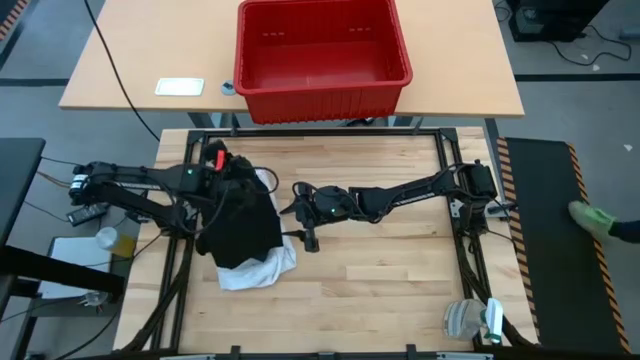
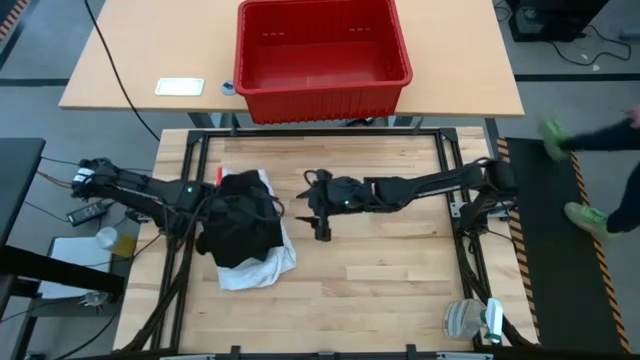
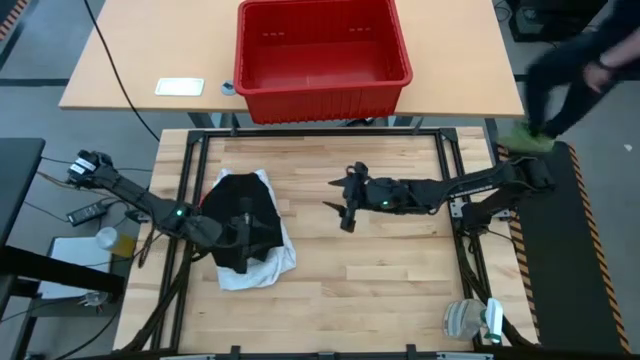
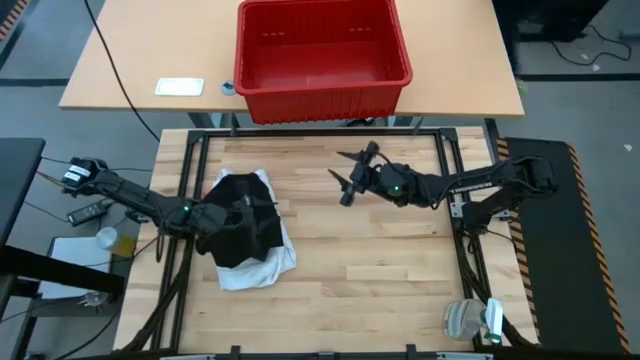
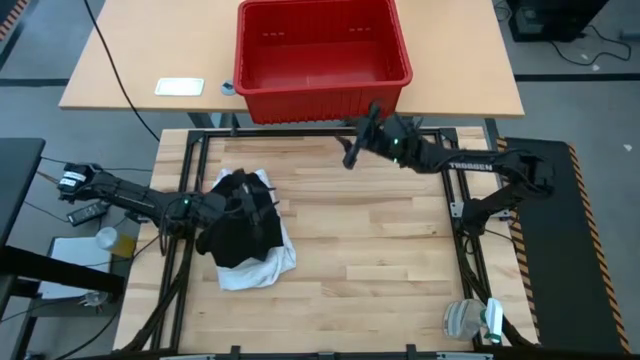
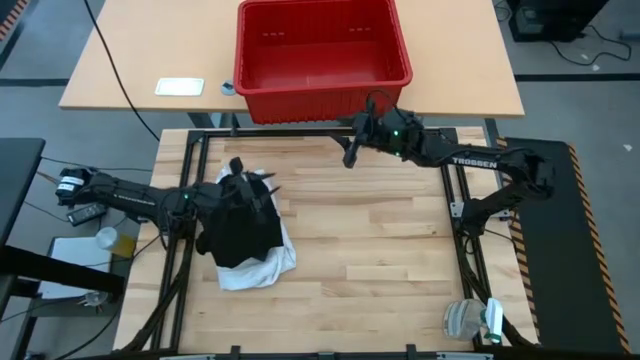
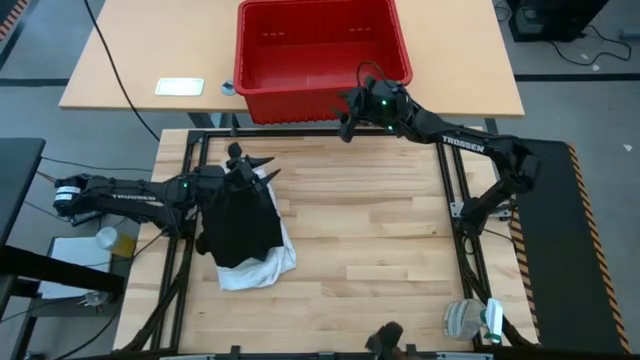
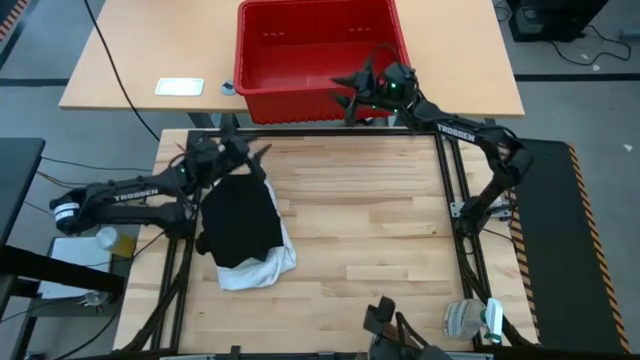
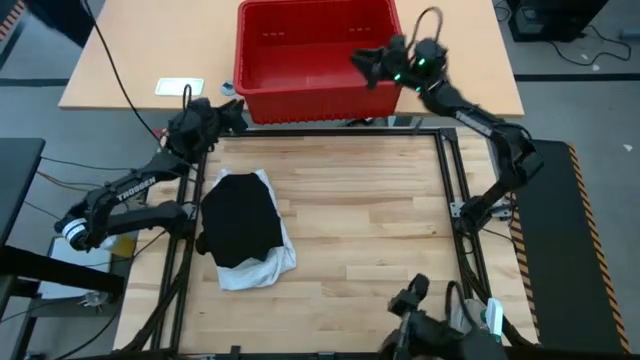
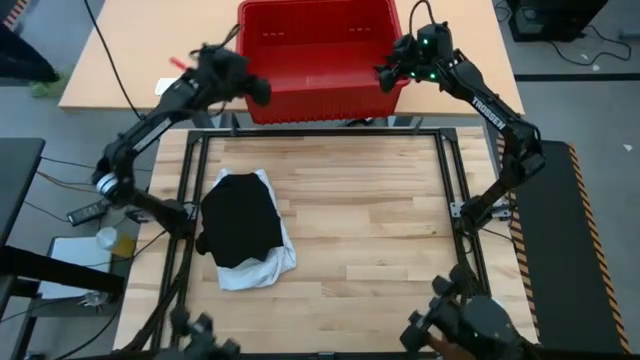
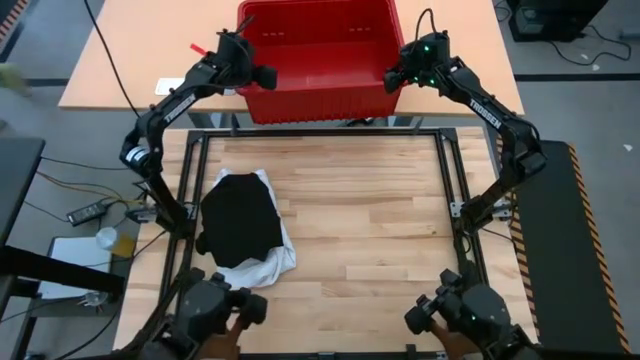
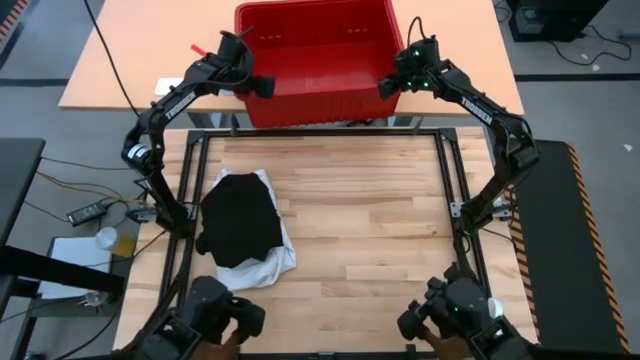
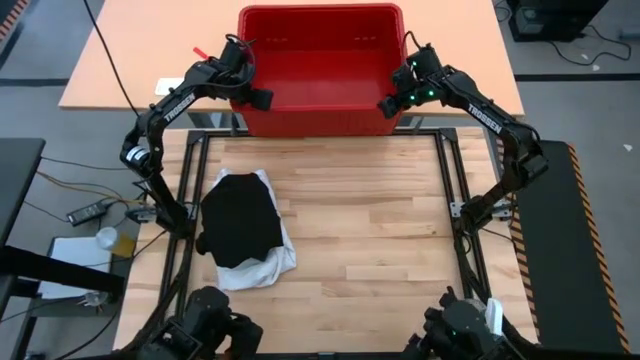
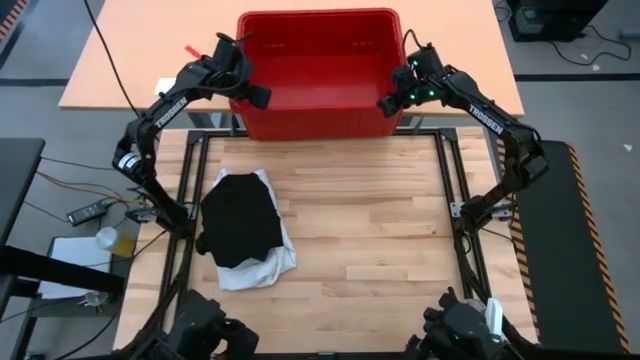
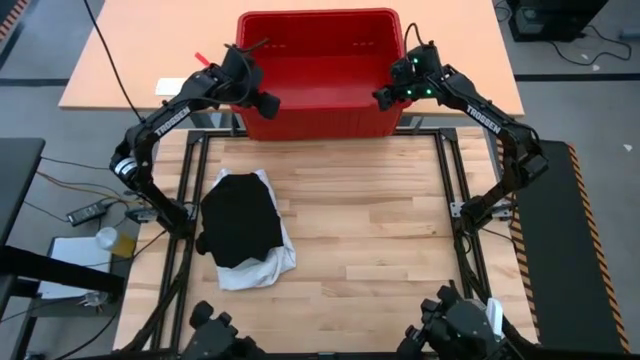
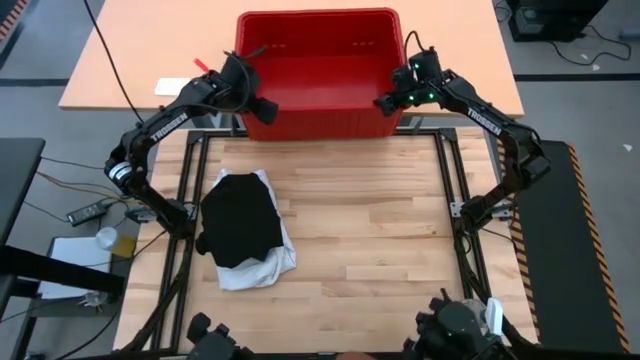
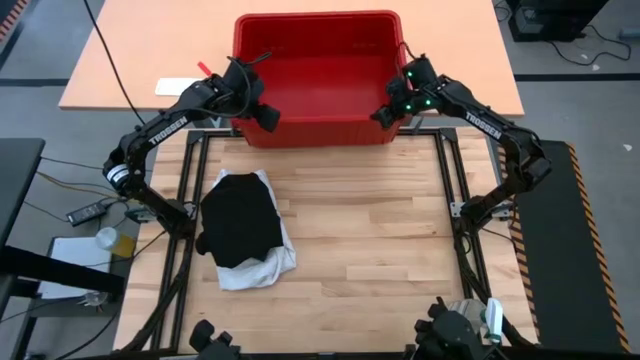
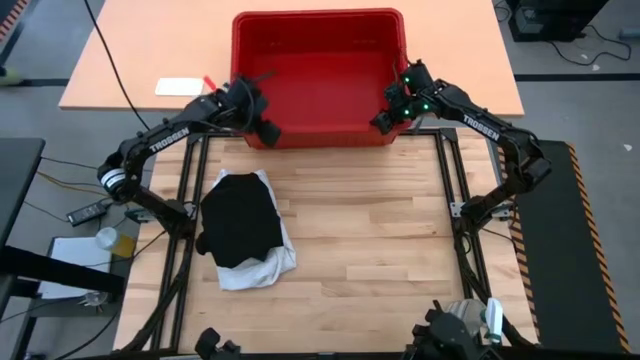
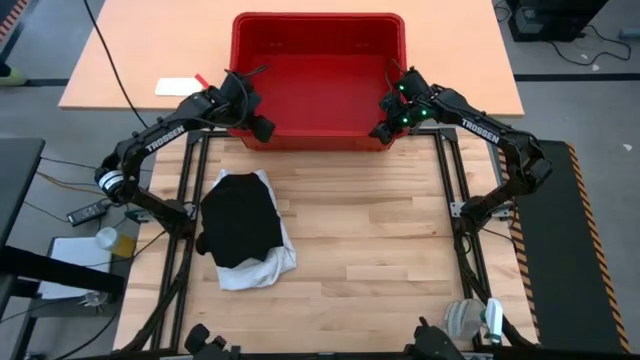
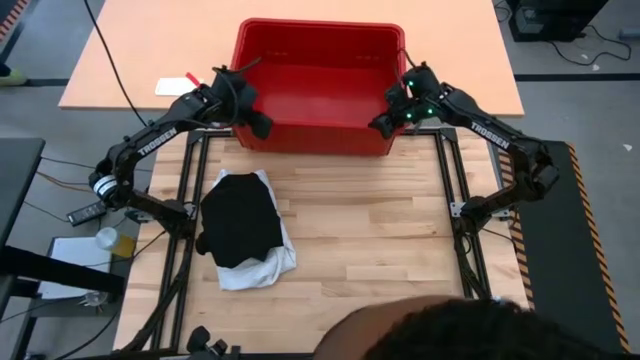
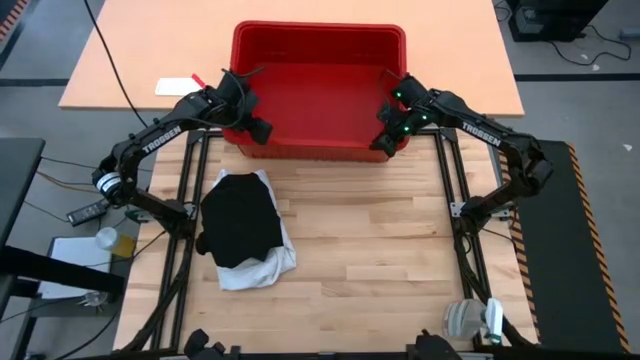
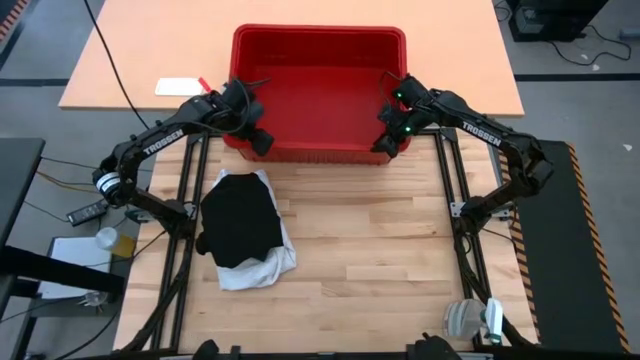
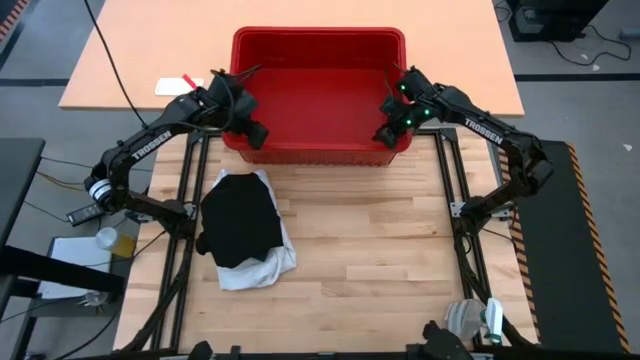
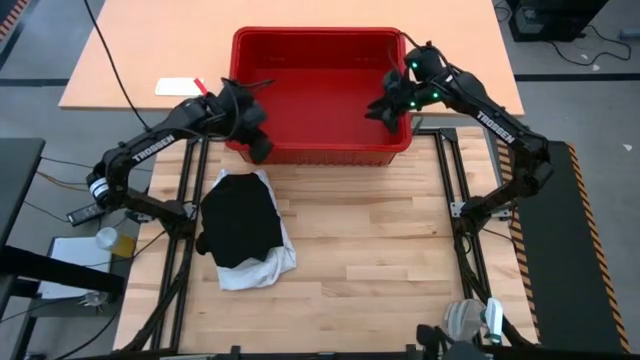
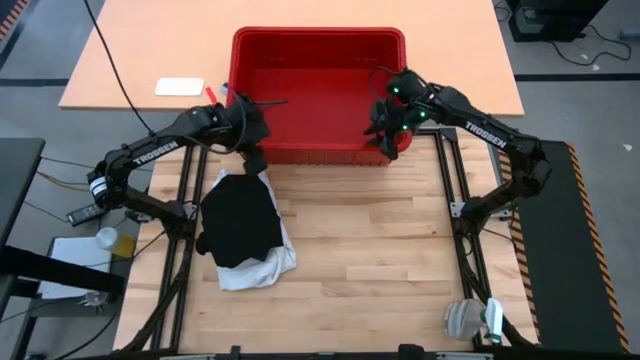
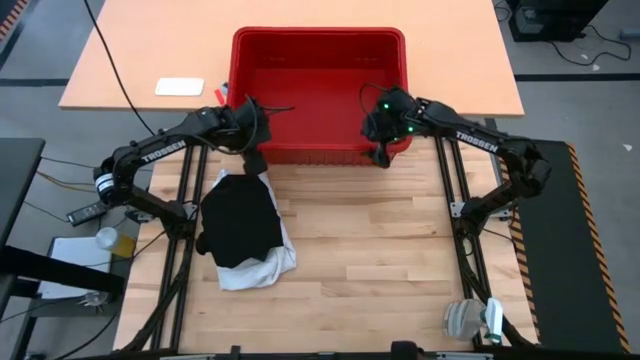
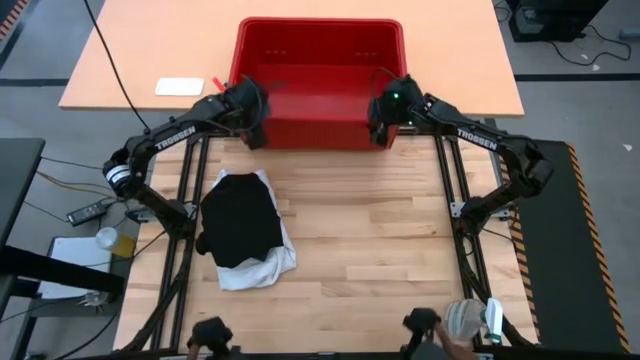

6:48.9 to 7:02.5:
Task: Fold laundry
Adjust the red bin

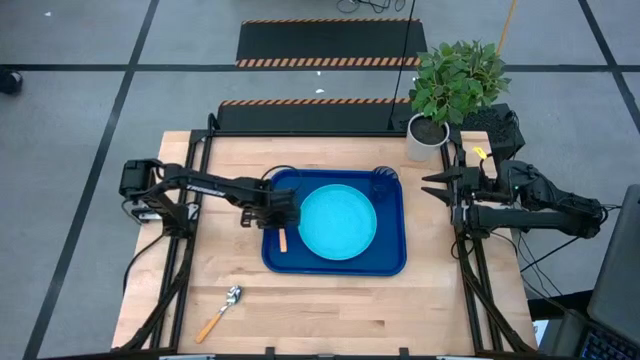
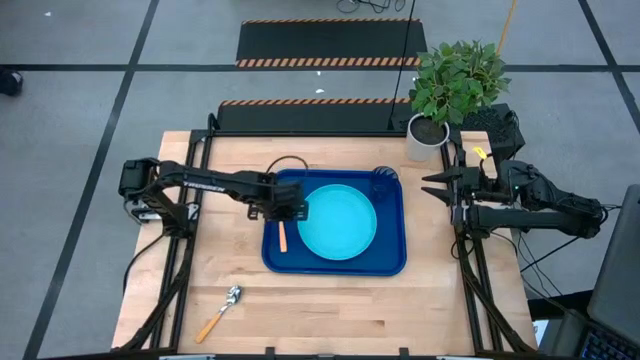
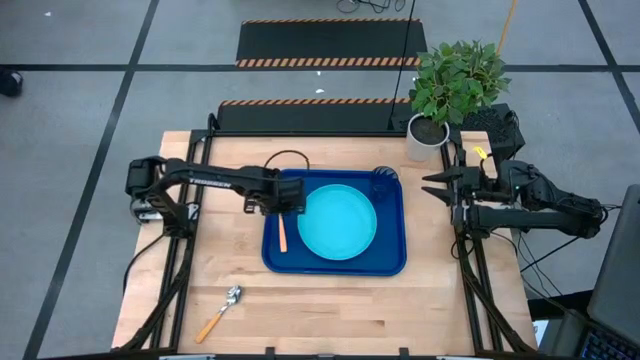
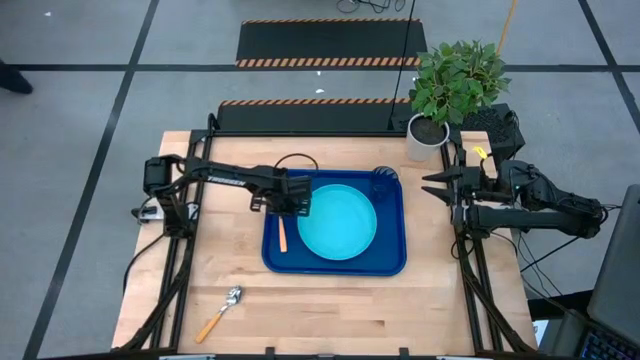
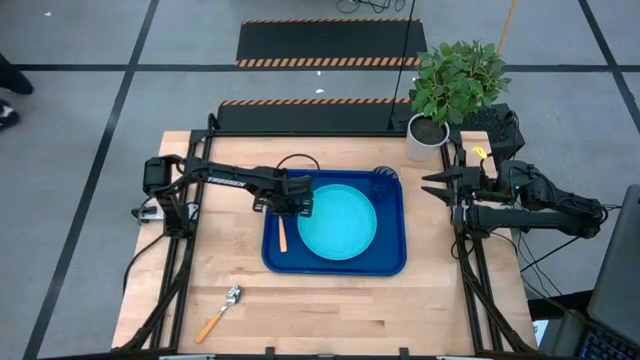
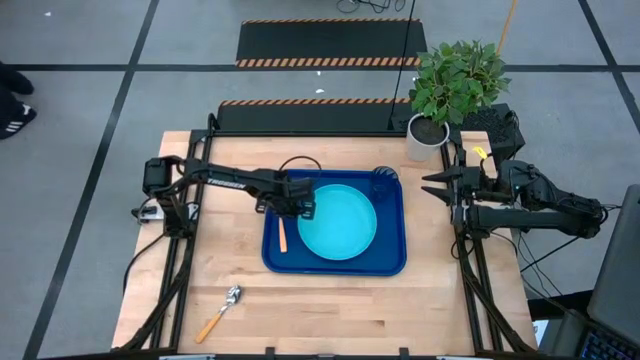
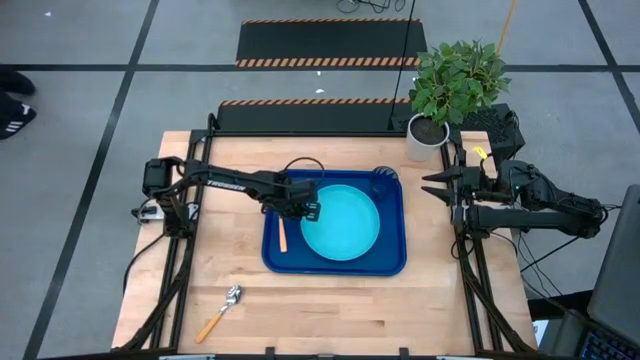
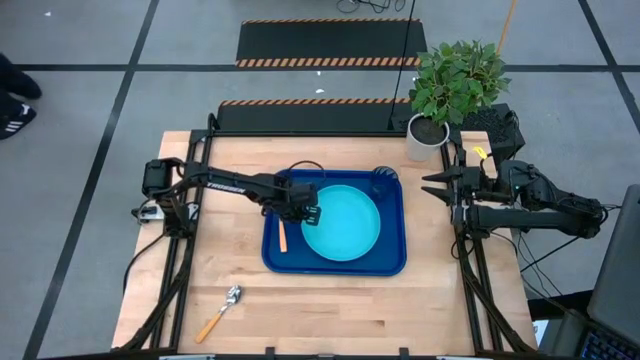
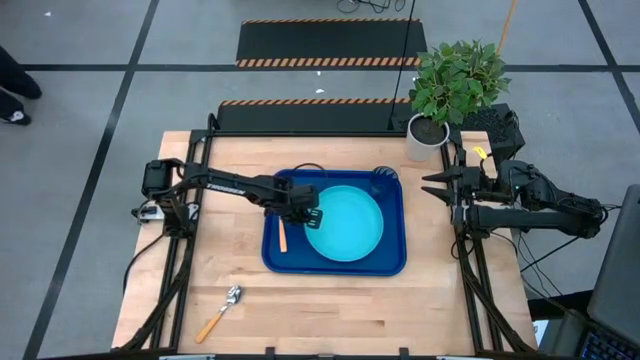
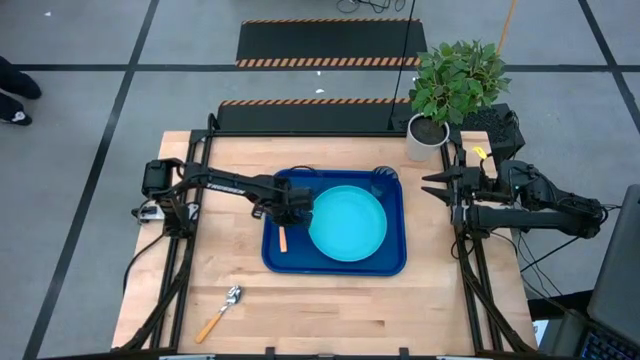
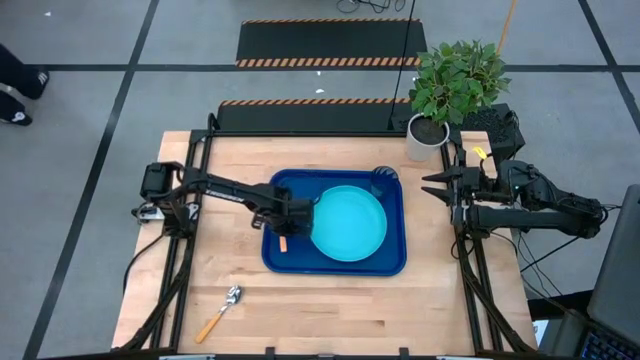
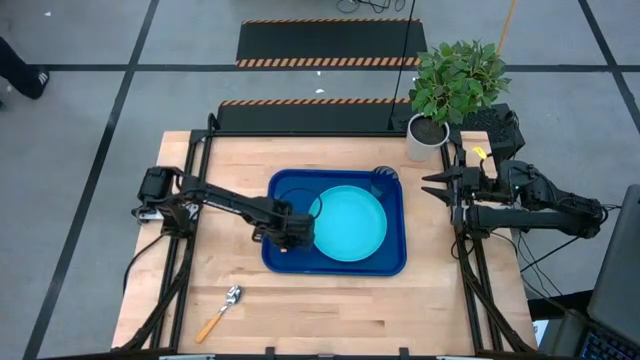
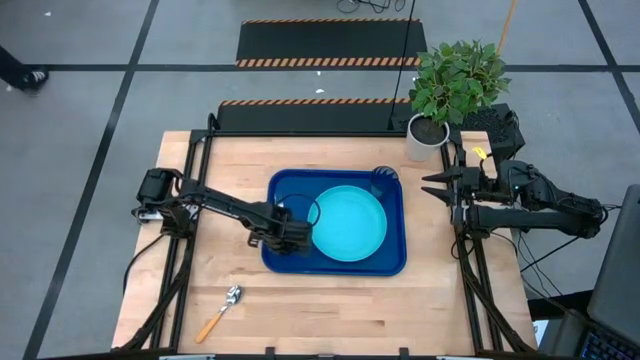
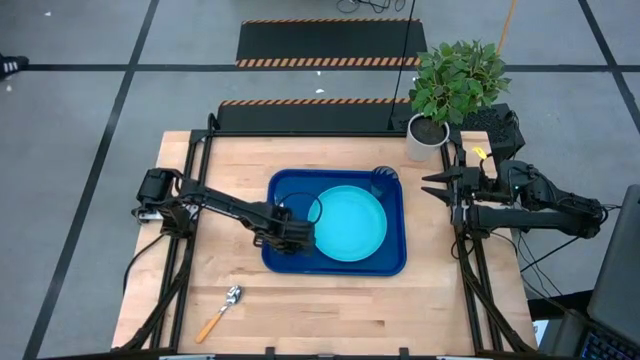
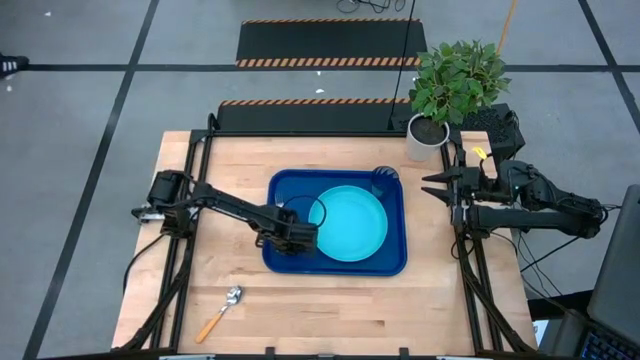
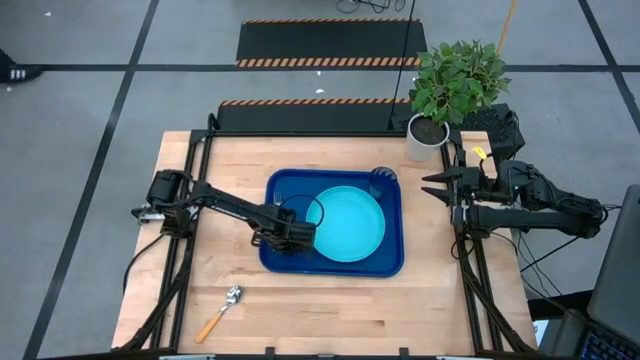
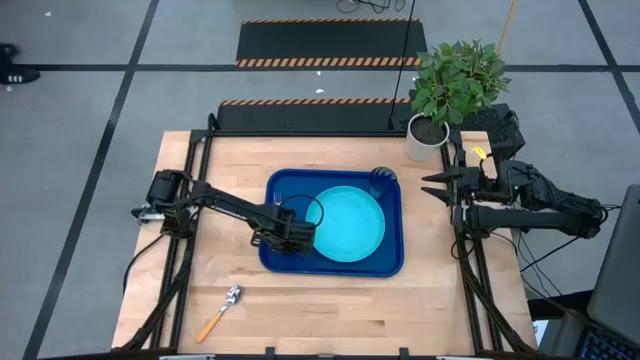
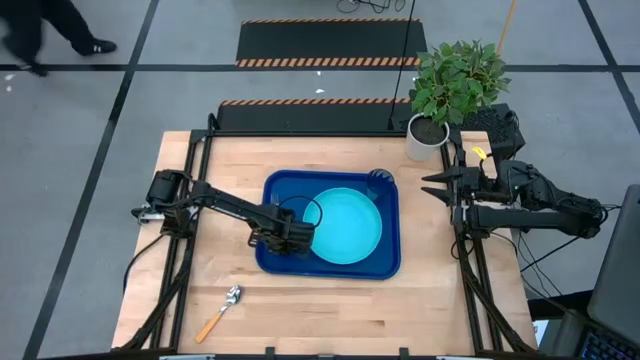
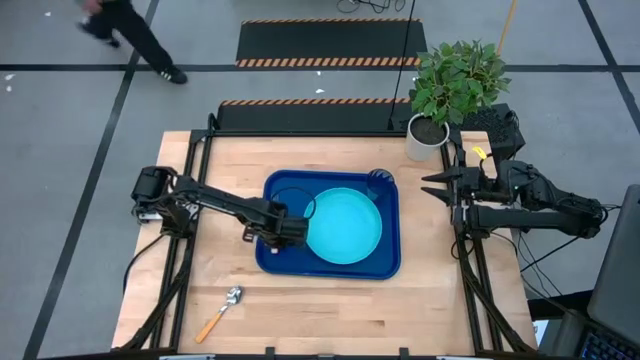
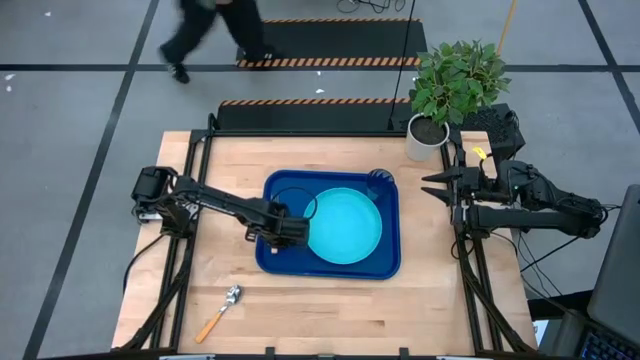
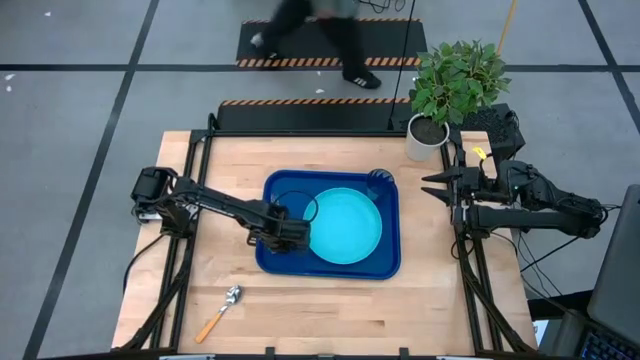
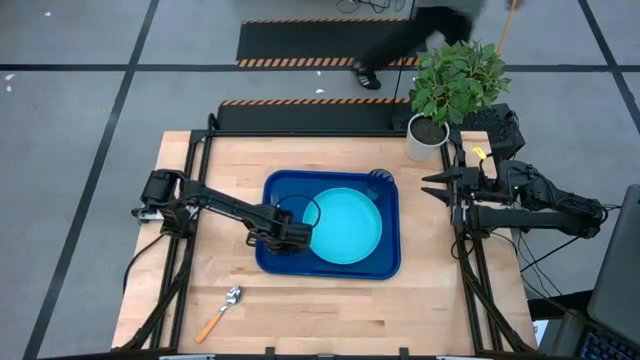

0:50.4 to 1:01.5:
Task: Pick and place plate/cup/fork/spoon on tray
Adjust the light blue plate and light orange fork
